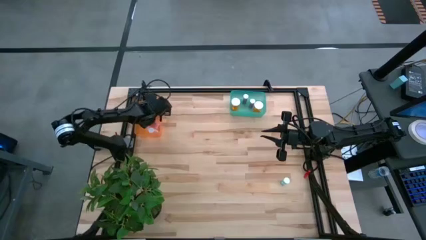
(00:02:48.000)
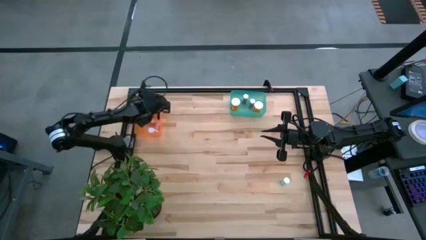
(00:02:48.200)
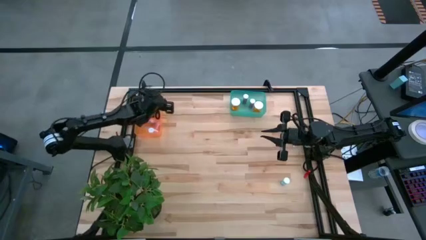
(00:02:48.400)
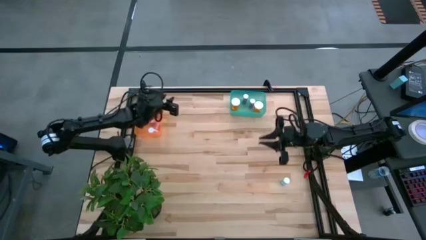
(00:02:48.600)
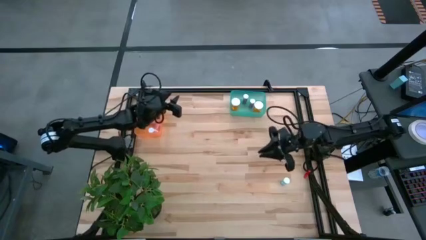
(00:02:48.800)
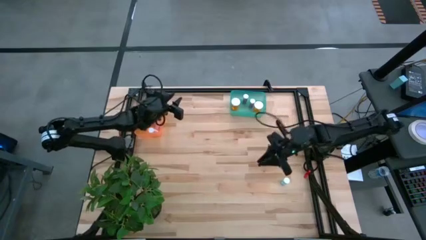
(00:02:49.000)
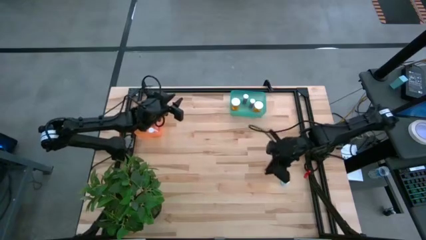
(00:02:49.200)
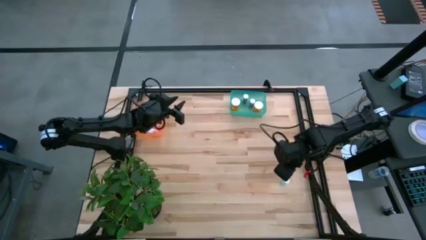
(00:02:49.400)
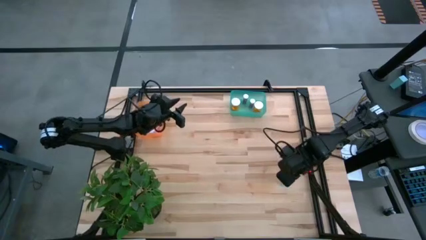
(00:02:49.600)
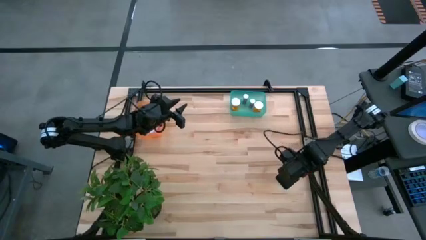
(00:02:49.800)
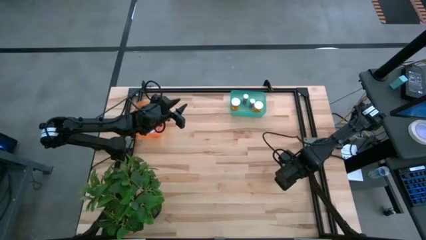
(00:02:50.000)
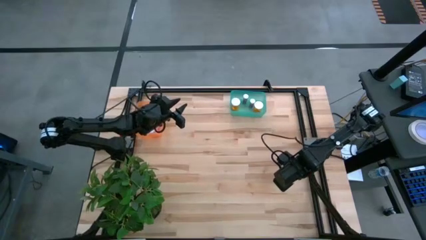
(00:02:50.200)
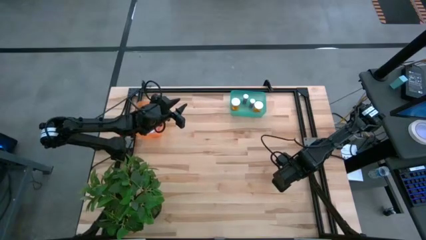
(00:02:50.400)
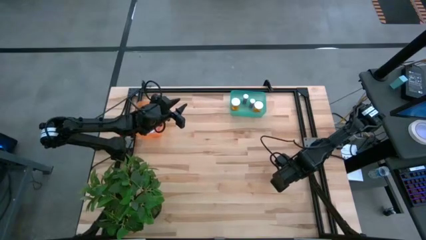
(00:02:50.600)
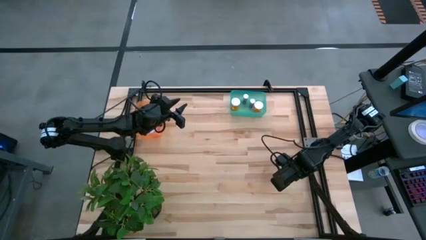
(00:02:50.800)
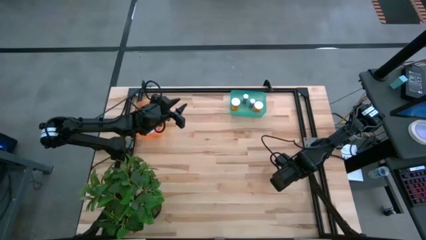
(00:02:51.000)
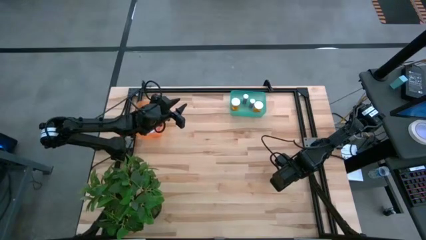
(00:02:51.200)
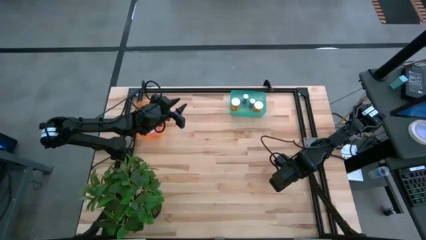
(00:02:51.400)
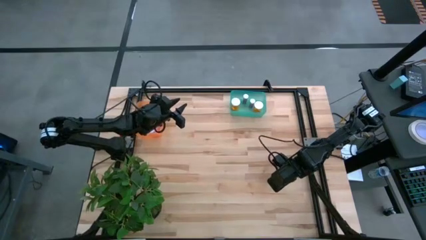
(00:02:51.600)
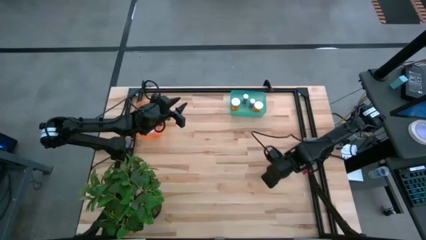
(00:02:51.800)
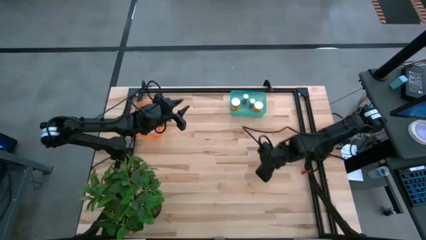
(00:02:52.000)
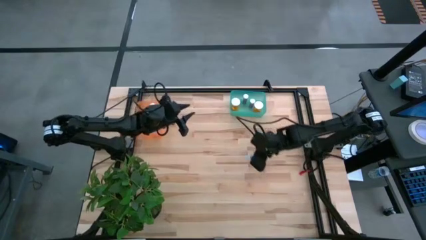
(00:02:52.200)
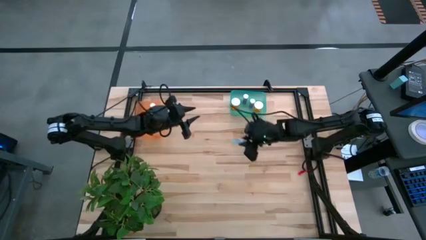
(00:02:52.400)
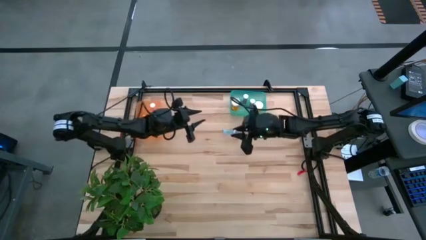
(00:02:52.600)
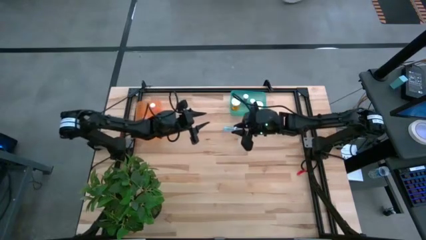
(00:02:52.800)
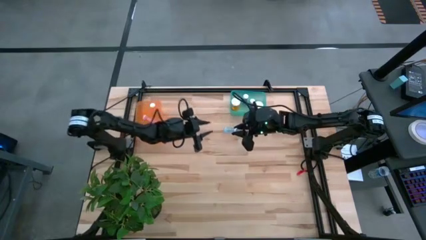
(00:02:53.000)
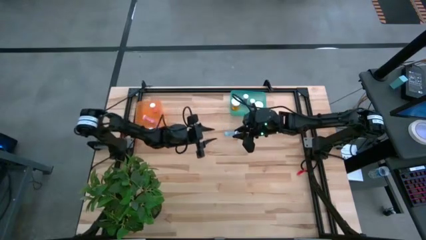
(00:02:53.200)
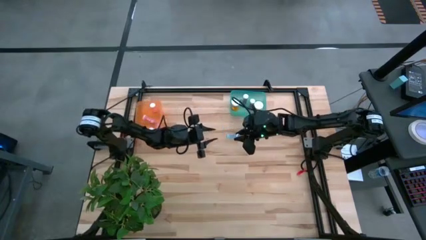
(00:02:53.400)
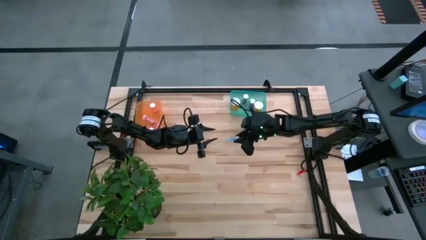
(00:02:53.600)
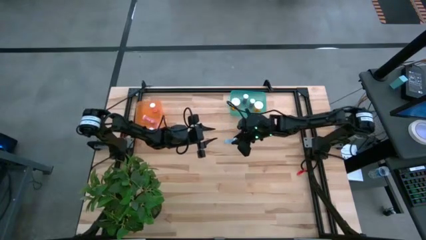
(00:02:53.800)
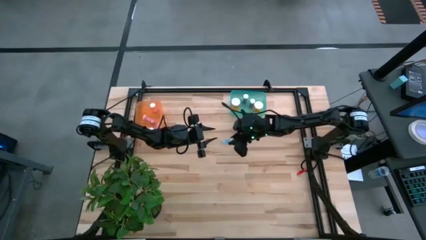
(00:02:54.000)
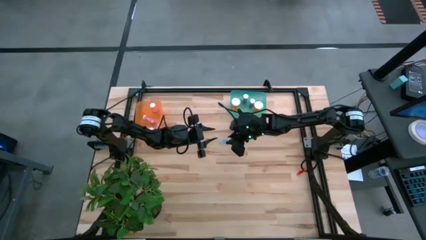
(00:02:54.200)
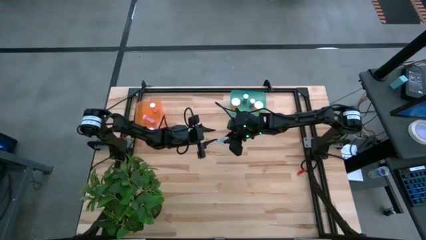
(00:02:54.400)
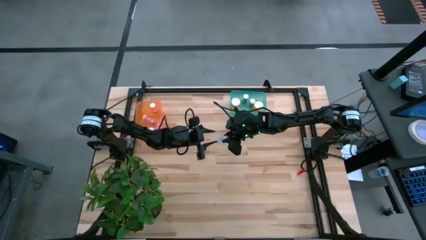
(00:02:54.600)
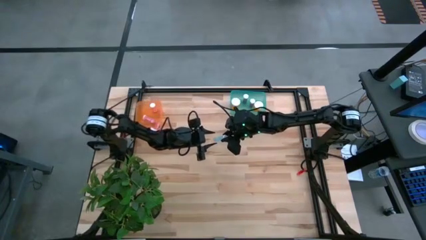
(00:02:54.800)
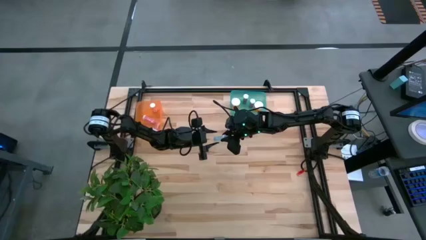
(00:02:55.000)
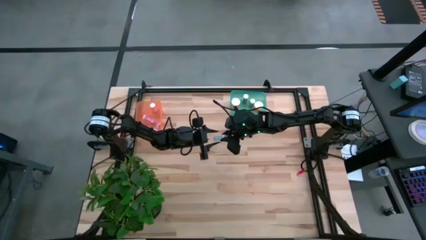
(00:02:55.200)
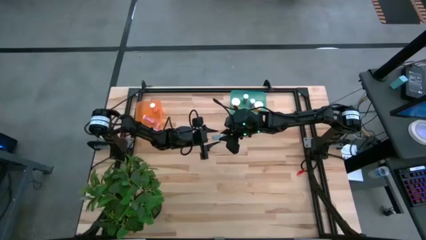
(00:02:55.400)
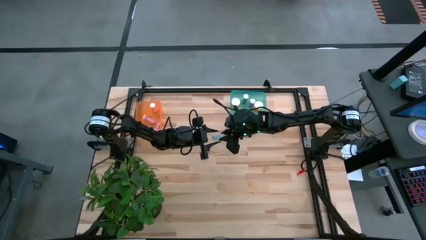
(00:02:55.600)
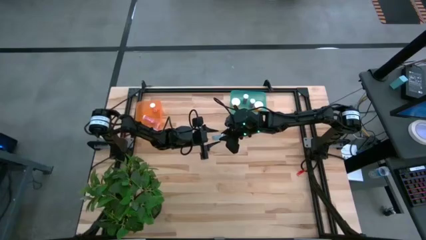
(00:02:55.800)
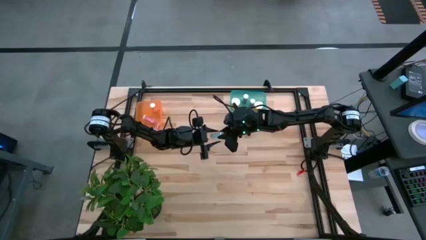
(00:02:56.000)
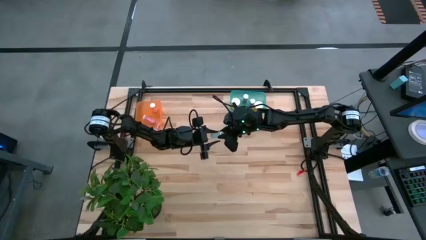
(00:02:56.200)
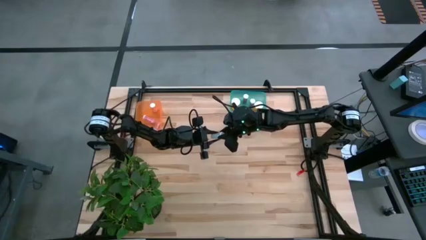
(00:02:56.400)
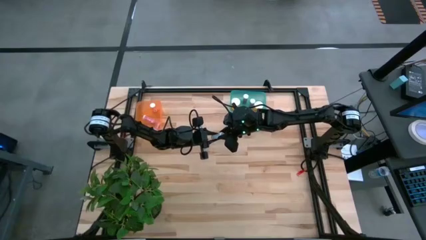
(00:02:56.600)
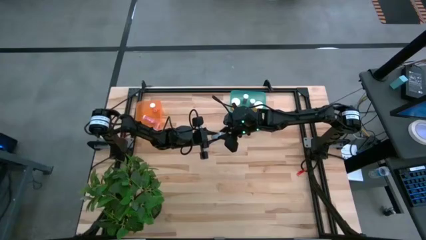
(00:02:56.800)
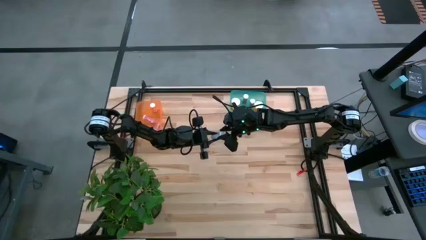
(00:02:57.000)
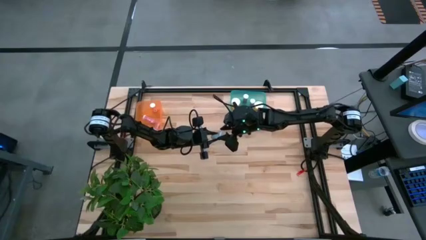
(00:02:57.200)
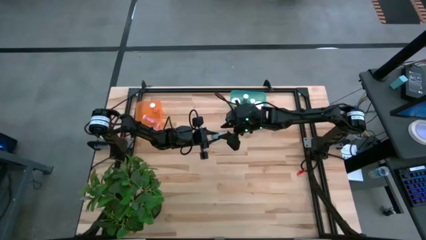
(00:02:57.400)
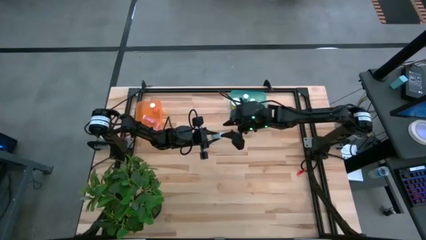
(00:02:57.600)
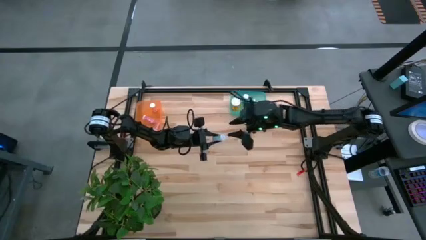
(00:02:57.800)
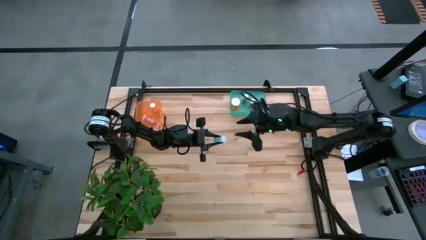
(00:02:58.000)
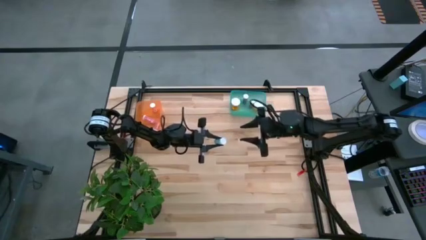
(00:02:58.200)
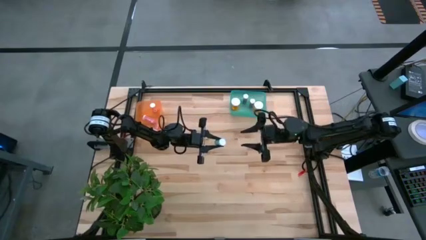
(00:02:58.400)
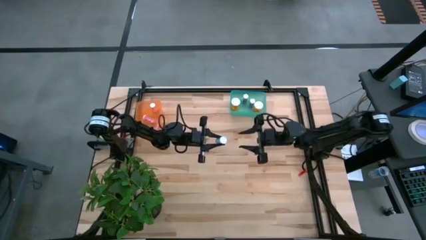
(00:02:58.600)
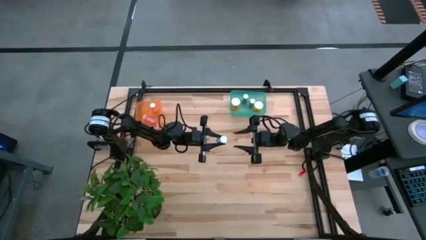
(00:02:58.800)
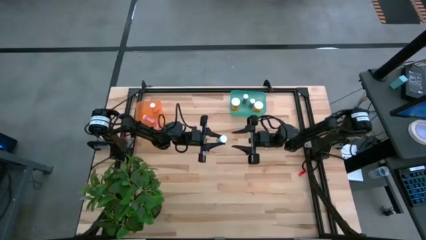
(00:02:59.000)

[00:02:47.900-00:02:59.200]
Task: Pick and place medicine bottles into bin by pill shape (circle, oval)
Put the blue tablet bottle into the orange bin

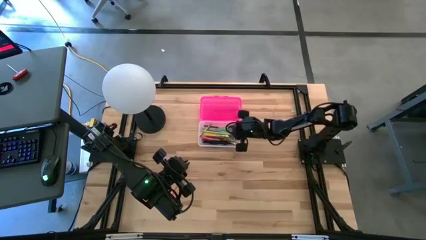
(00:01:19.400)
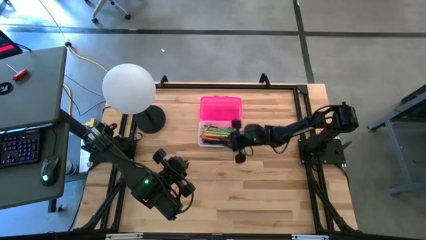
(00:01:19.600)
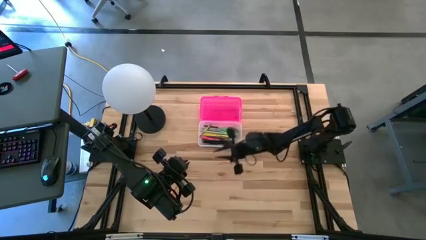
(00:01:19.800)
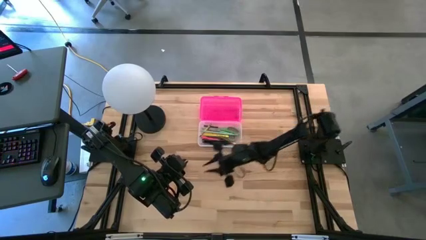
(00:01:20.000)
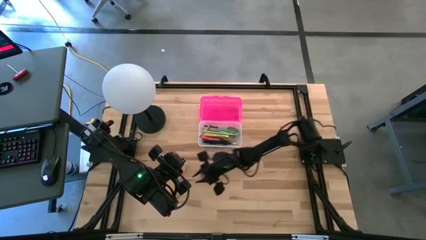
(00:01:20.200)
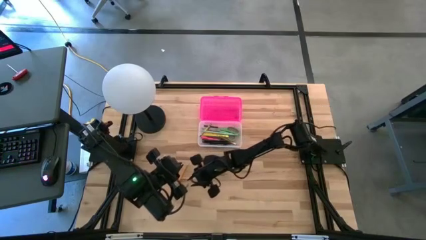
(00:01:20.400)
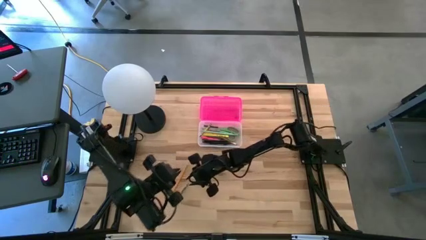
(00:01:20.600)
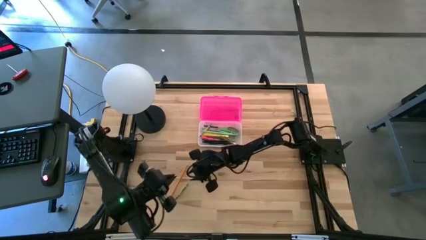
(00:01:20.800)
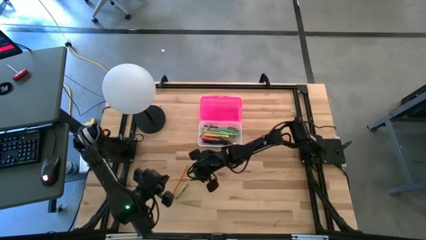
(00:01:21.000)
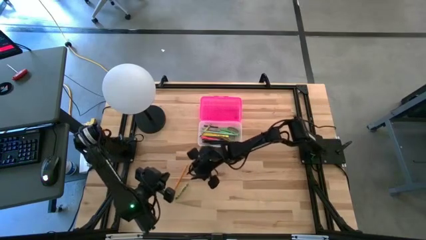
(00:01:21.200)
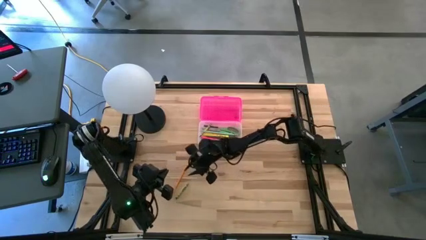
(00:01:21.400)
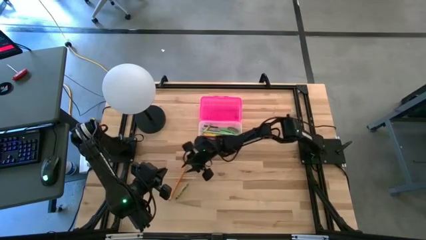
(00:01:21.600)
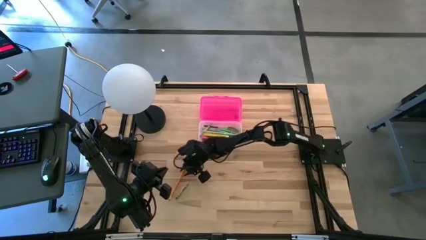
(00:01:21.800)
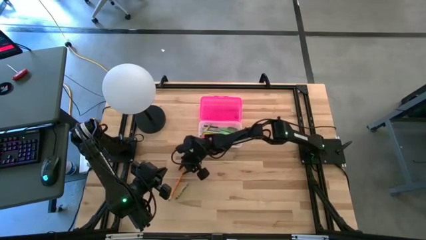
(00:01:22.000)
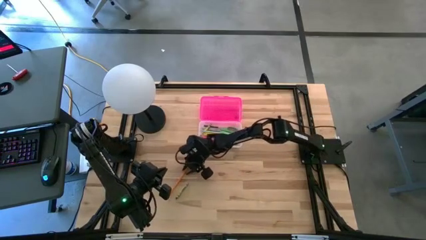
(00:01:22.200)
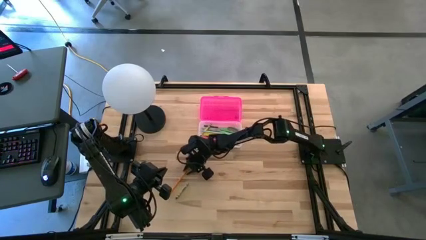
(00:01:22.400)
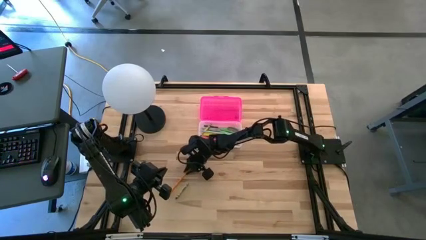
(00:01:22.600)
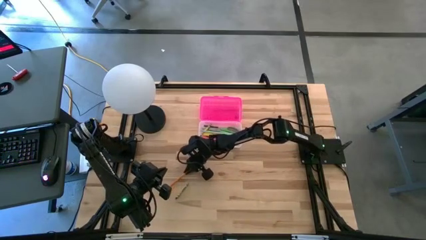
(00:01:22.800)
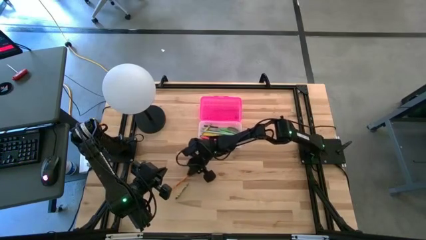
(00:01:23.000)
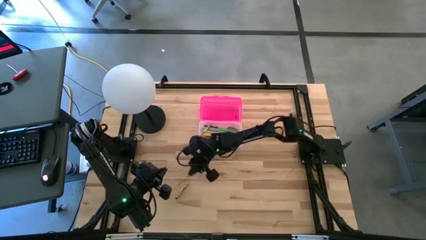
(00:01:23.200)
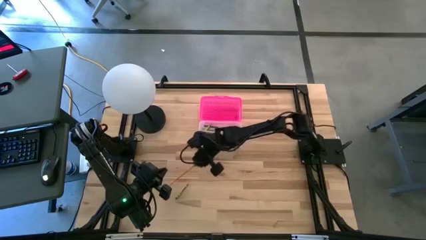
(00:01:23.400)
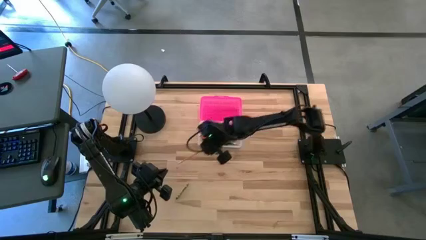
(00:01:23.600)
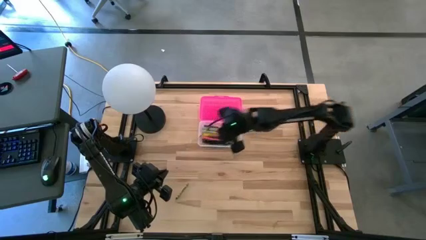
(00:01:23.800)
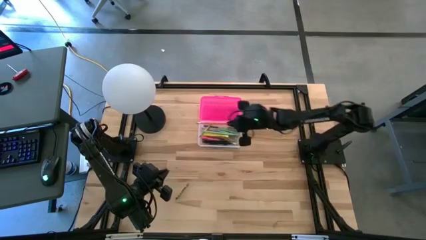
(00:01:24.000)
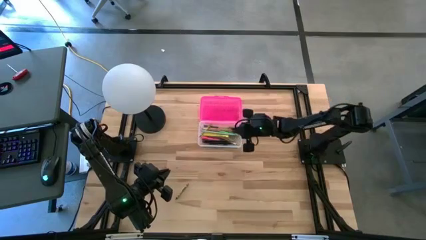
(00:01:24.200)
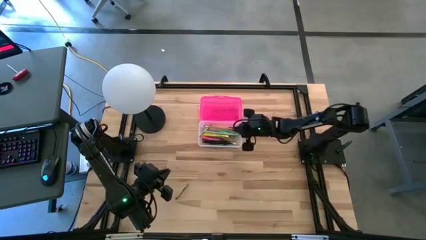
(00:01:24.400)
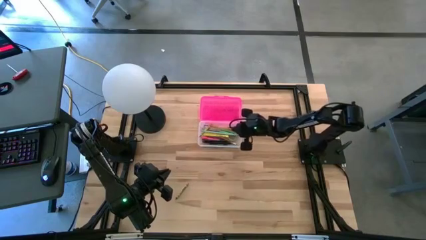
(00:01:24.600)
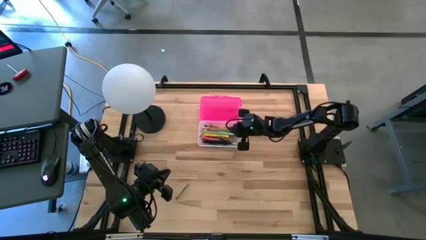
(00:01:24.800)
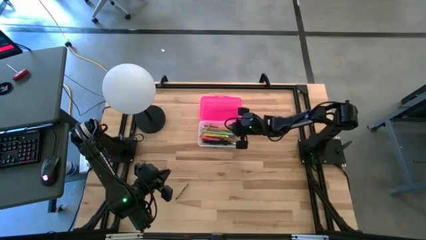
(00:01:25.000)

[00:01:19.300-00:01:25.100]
Task: Pick & place school supplies into a supply box
Put the orange pencil into the pink supply box
